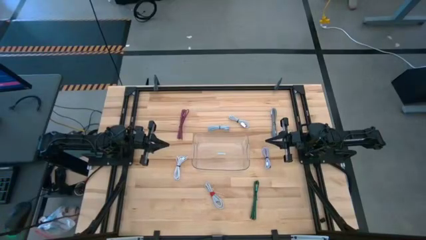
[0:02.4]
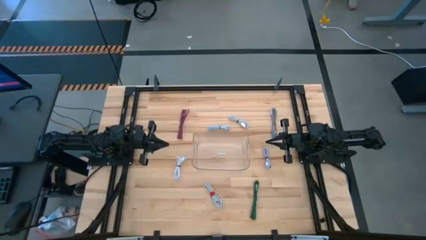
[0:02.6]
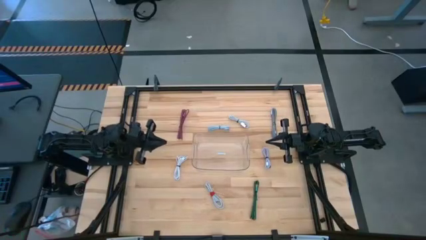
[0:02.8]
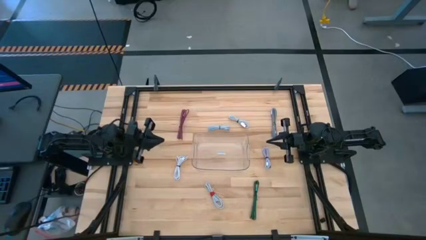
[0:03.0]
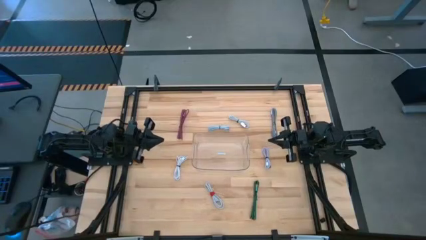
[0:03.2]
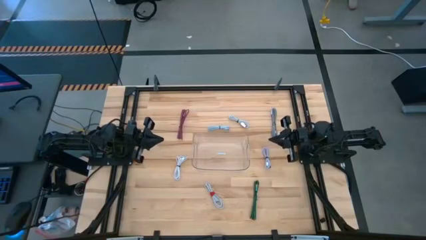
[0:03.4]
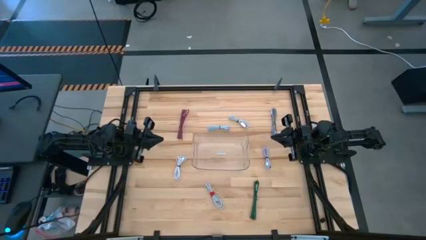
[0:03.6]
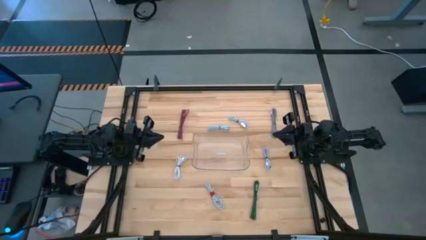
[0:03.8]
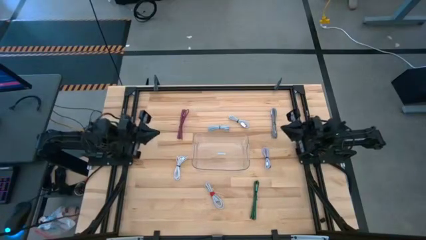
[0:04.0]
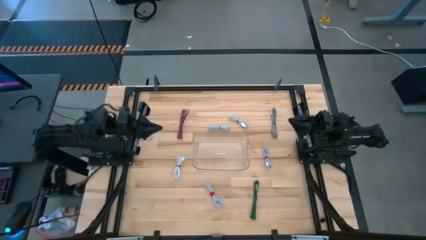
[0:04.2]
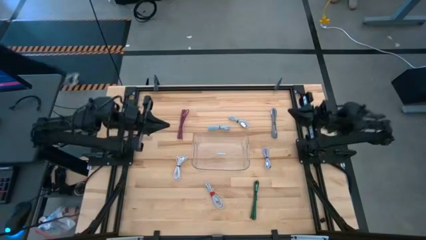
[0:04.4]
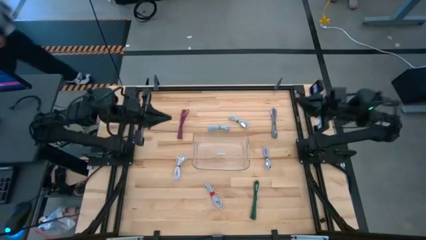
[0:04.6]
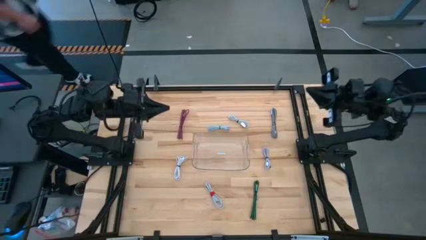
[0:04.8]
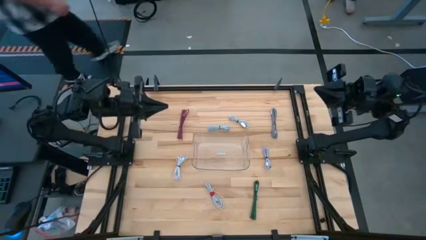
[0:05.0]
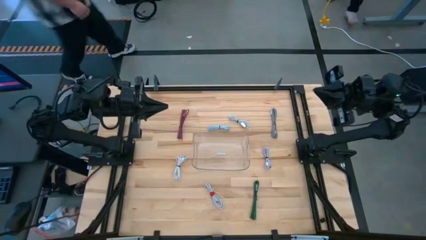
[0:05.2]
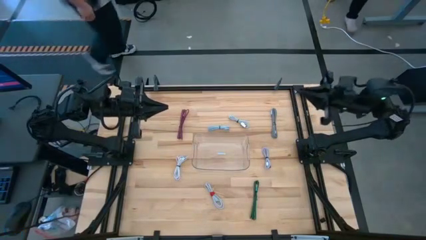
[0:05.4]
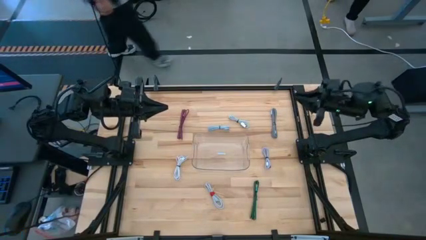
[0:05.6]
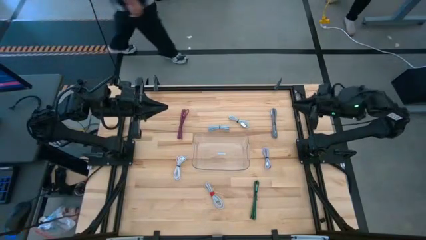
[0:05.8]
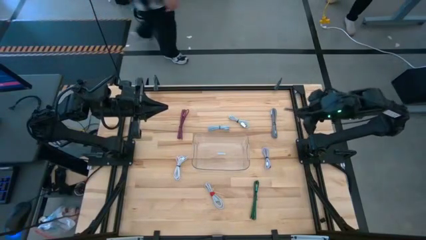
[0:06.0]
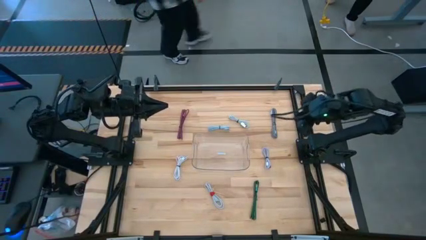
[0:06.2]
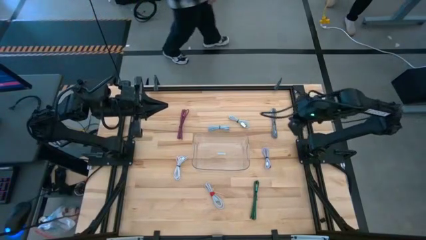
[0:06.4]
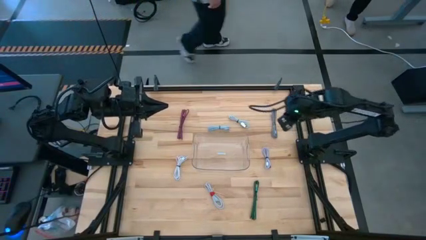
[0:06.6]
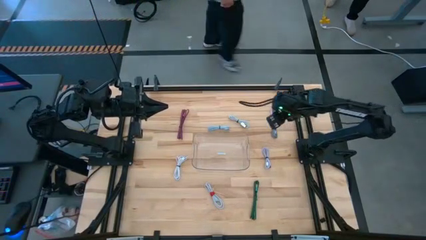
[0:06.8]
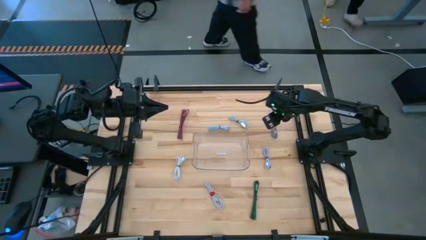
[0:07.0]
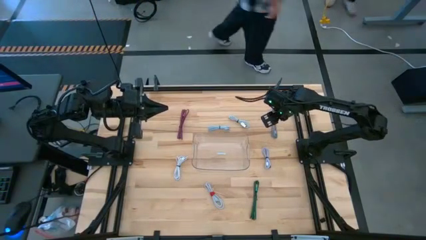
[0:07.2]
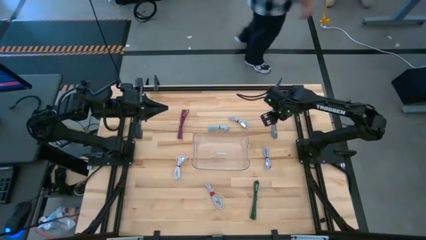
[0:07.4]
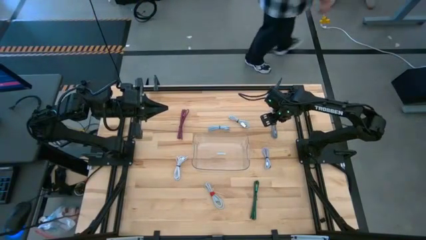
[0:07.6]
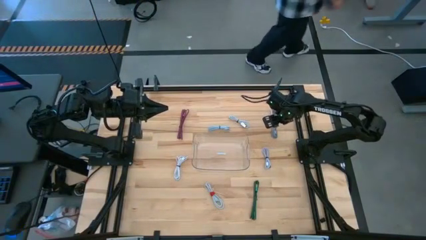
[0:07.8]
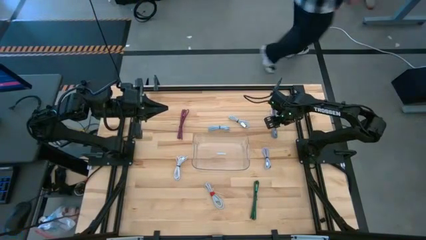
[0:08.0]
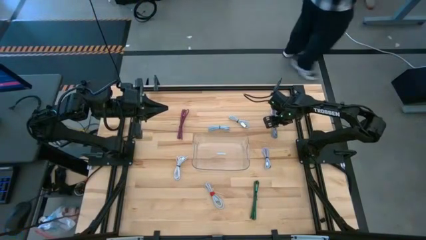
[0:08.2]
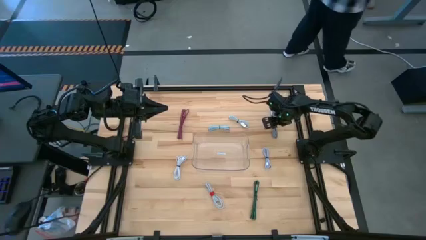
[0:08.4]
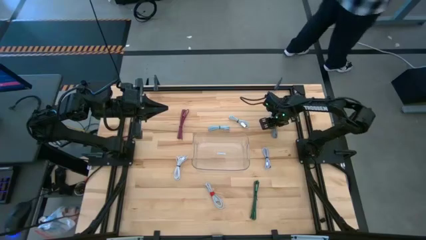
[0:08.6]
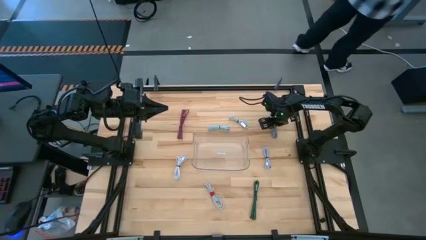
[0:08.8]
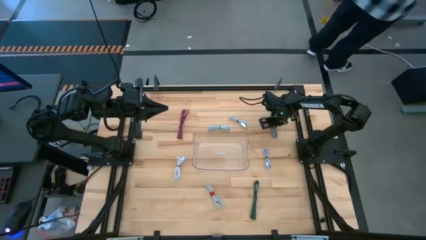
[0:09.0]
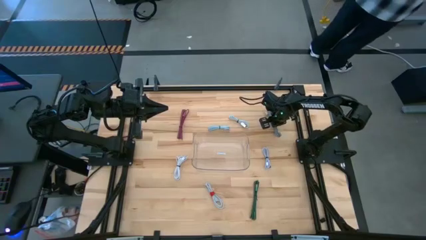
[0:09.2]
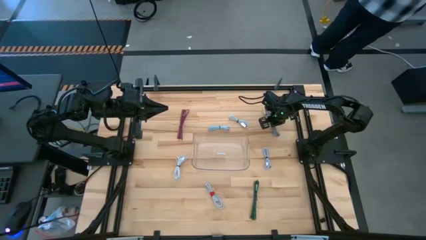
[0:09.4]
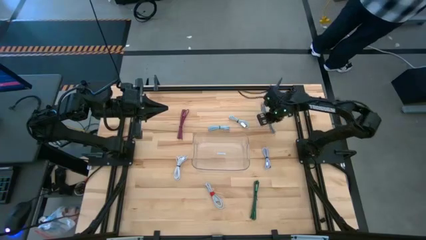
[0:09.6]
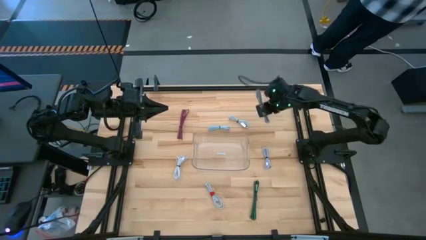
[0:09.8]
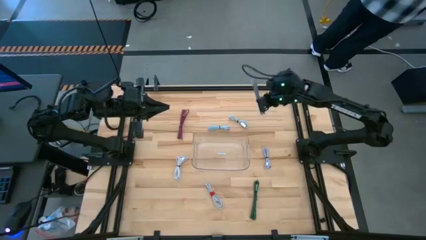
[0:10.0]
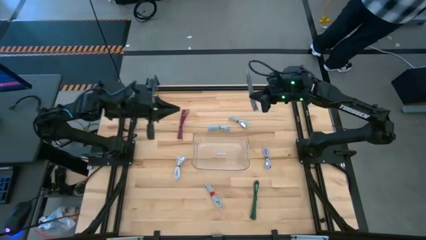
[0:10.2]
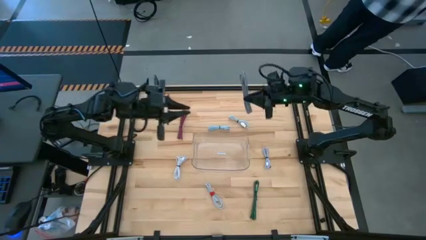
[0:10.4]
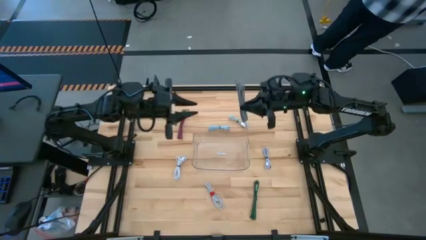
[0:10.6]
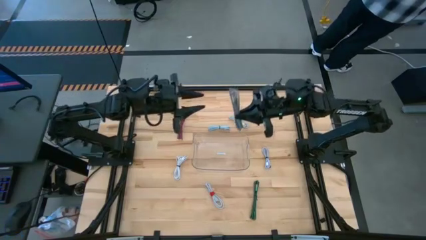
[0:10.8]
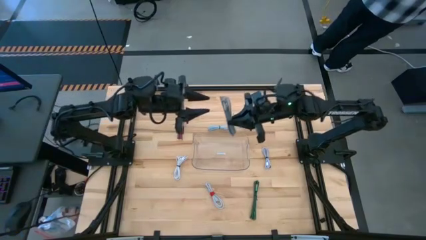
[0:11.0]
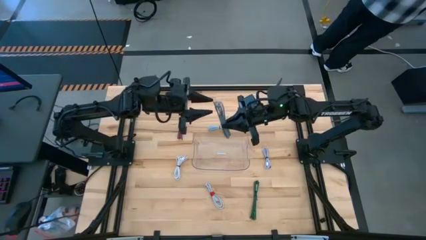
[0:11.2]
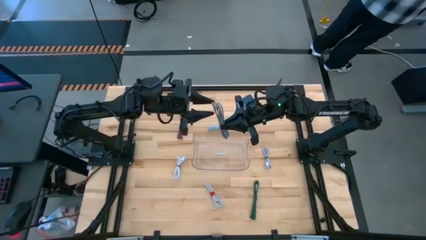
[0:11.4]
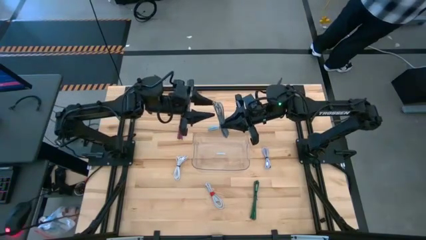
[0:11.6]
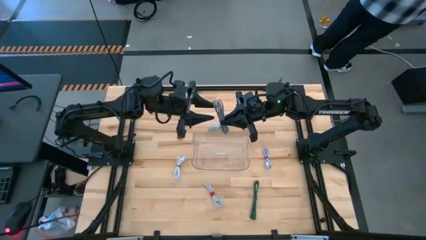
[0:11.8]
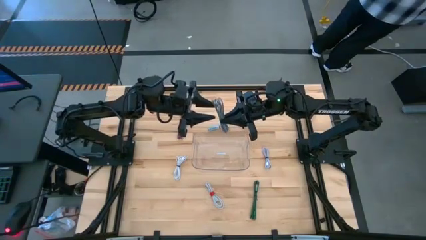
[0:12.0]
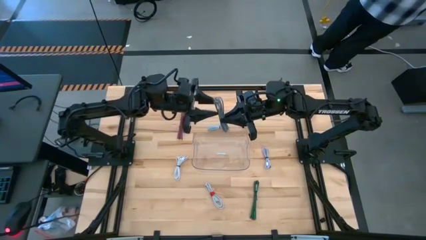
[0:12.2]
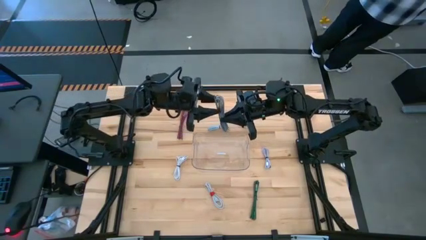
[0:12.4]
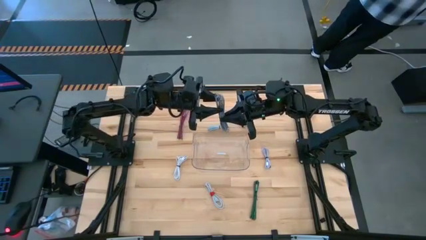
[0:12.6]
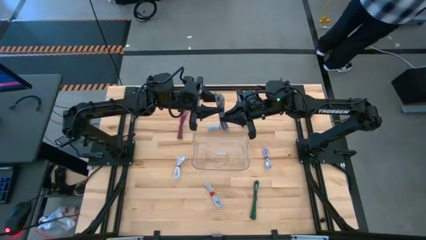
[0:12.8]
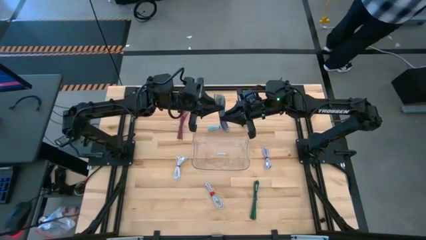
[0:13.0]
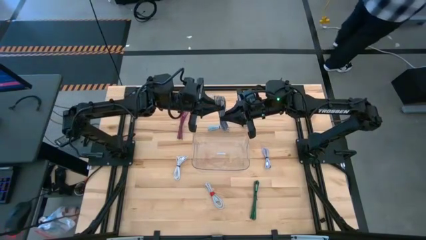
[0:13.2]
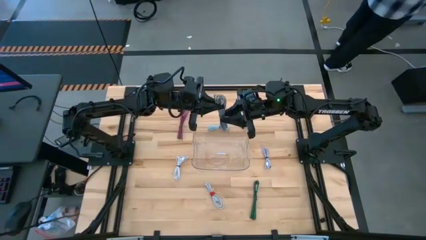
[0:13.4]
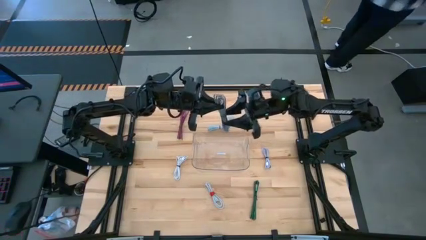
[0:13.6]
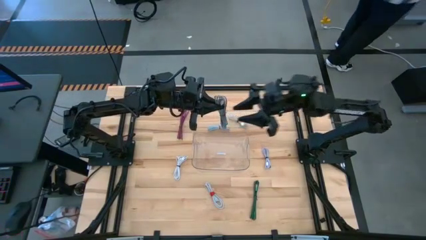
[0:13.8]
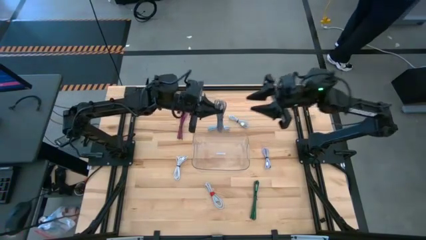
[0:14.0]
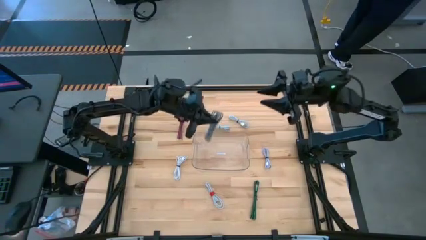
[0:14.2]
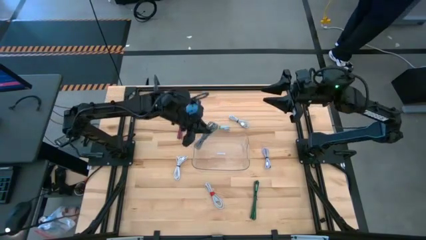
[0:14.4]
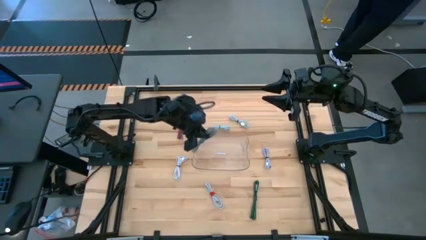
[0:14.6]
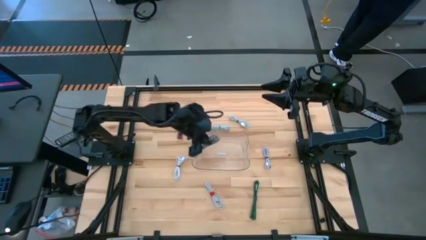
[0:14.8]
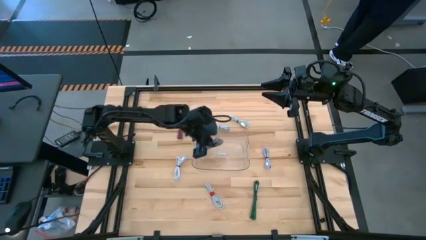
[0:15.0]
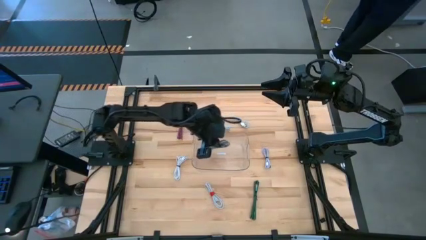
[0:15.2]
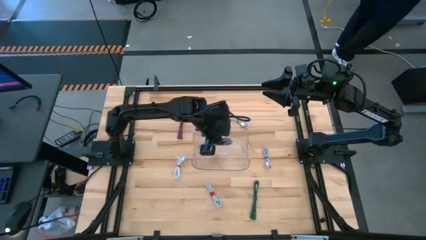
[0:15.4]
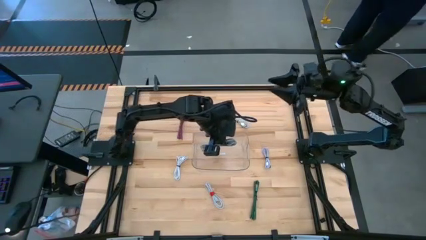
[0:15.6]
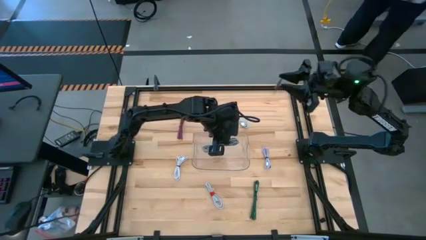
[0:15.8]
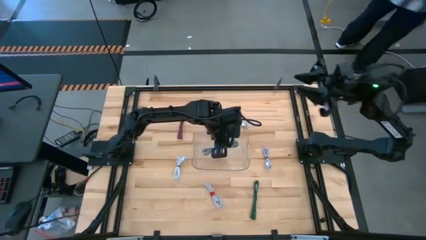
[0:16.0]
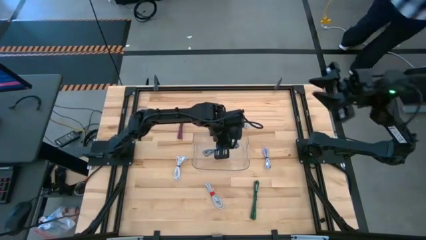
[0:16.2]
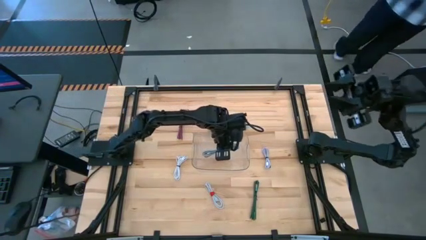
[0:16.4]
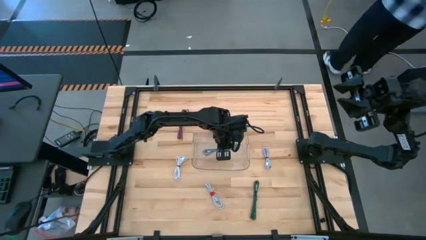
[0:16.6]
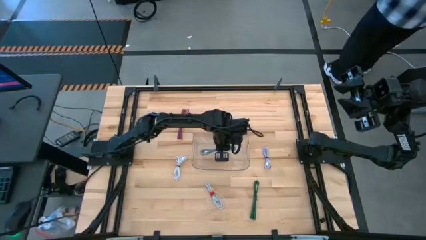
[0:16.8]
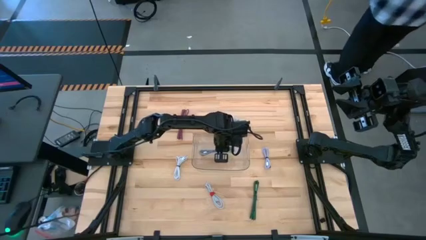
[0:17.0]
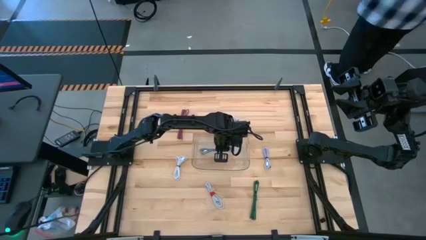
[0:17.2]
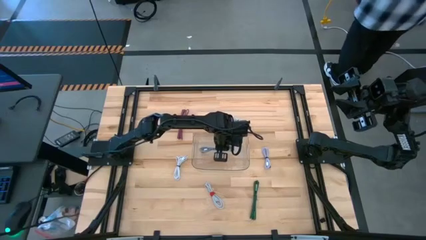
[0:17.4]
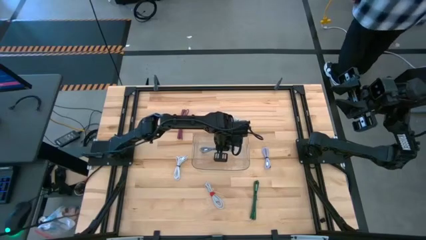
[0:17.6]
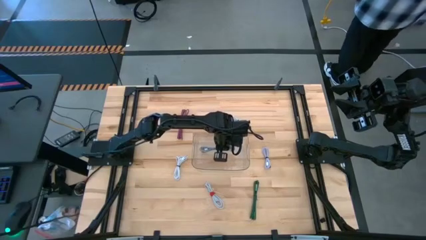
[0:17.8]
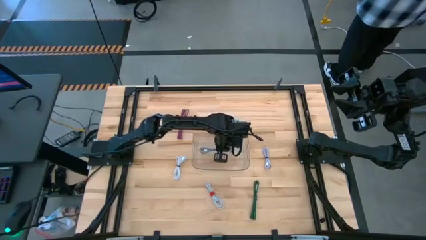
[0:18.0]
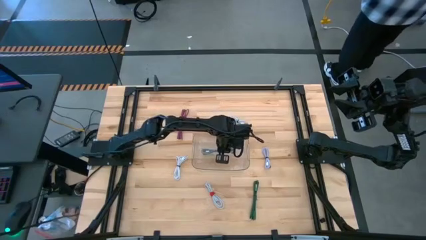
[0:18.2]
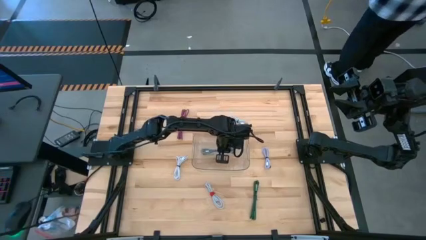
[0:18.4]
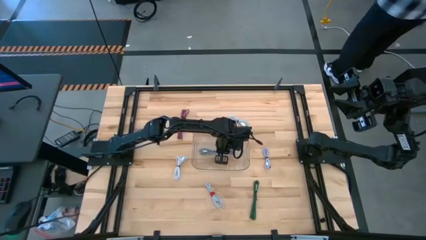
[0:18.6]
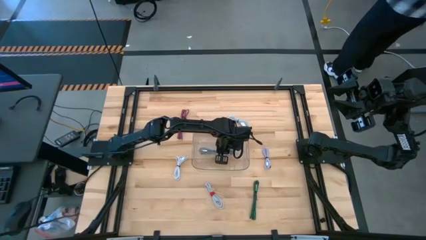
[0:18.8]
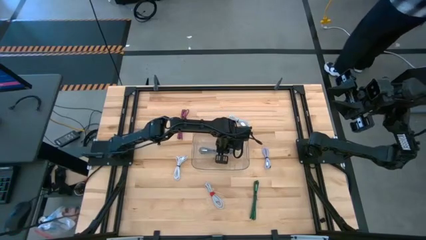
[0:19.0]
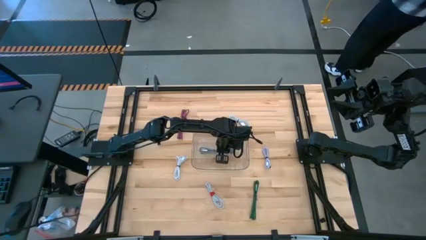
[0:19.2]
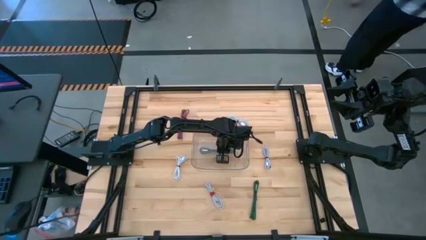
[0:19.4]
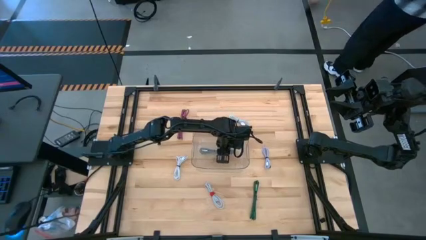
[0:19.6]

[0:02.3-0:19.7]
Task: Pick and place USB-C Cables
Put the white patterned charger cable into the transparent bin
